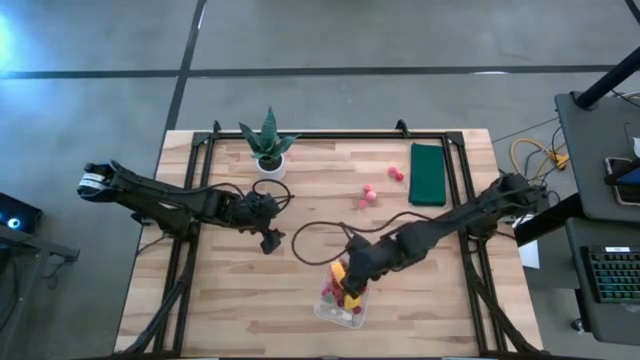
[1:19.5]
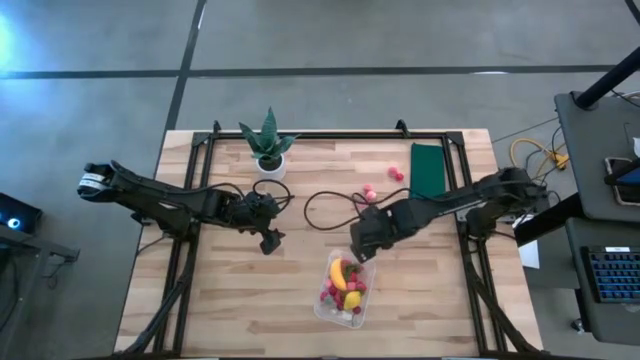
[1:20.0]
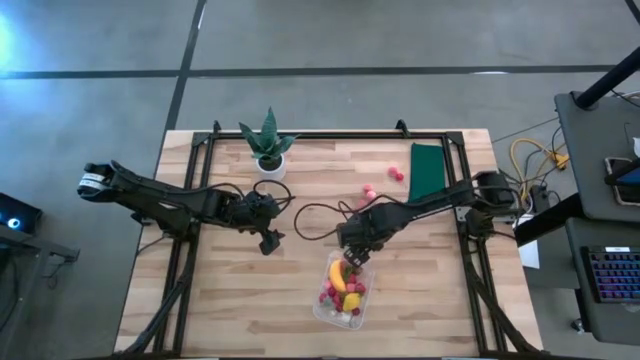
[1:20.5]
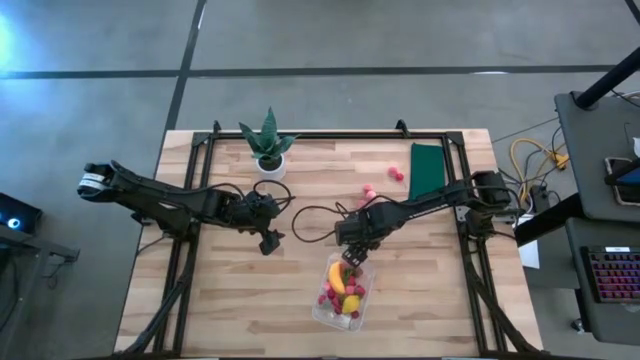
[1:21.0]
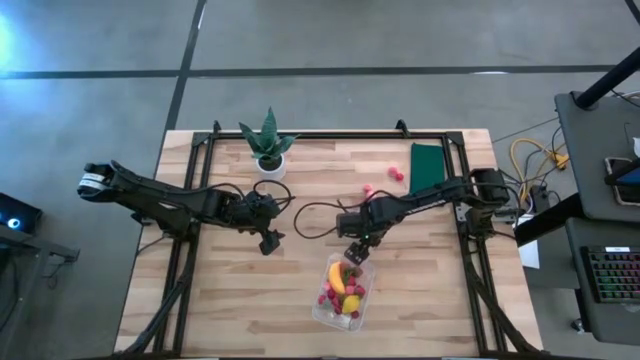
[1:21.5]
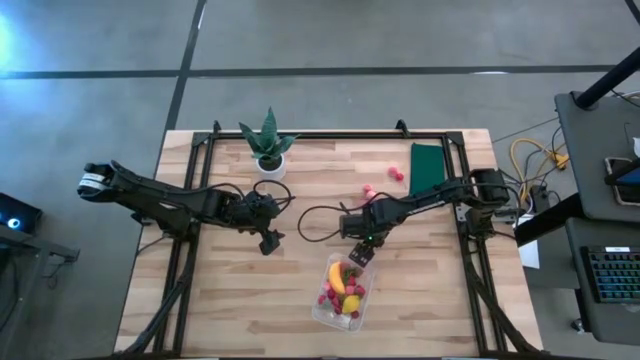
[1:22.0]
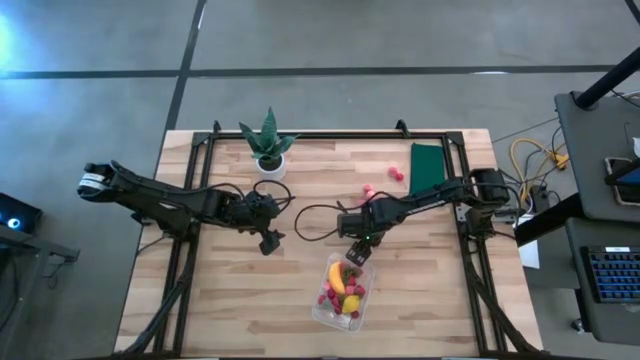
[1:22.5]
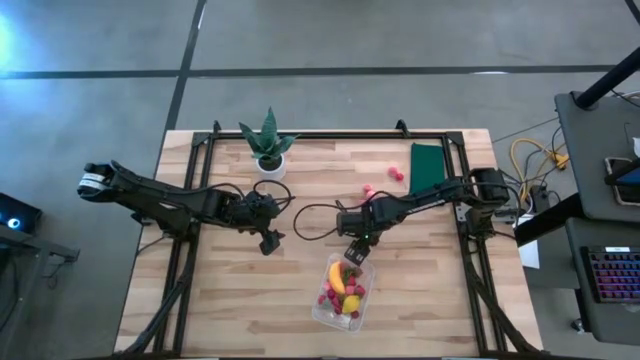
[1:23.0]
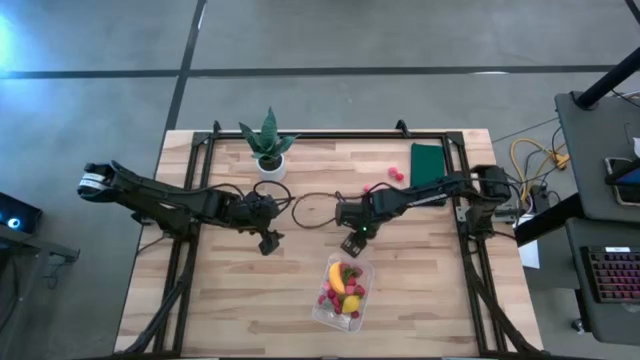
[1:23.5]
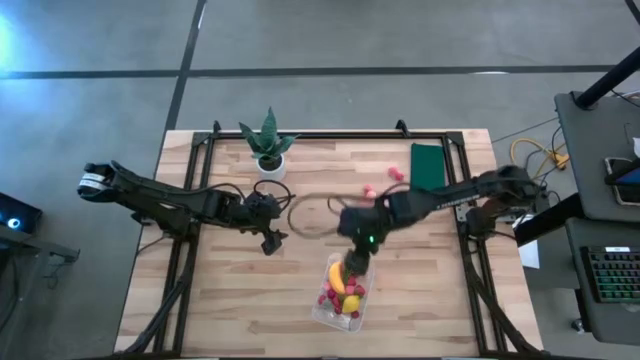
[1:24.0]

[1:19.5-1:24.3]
Task: Pick and placing Produce into tupperware
Put the strawberry into the transparent bin

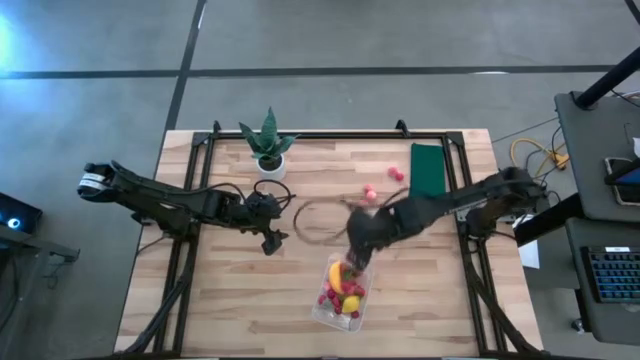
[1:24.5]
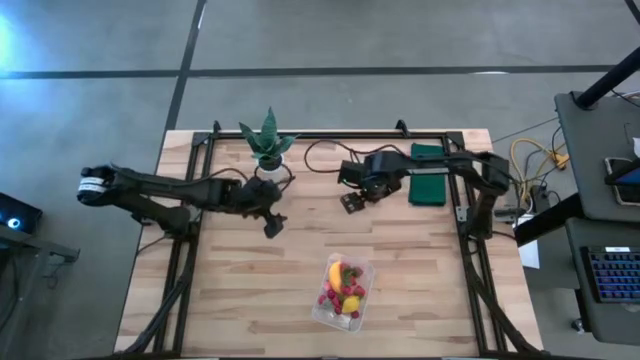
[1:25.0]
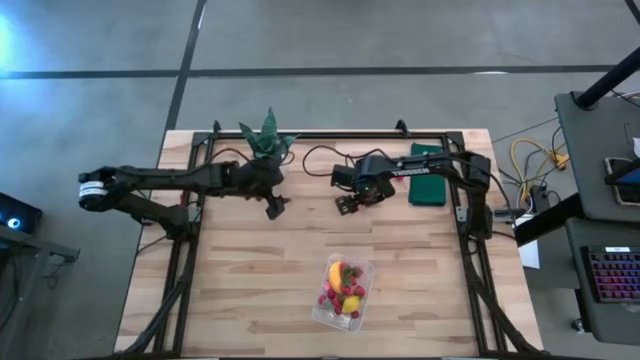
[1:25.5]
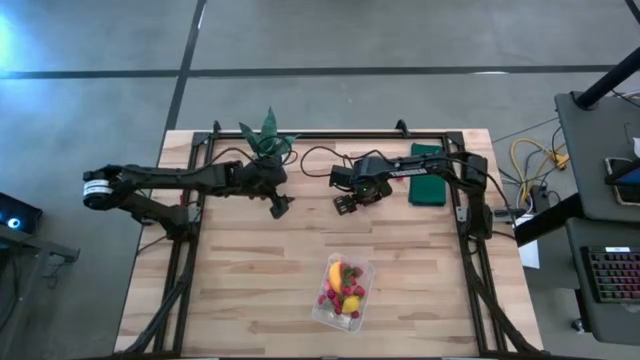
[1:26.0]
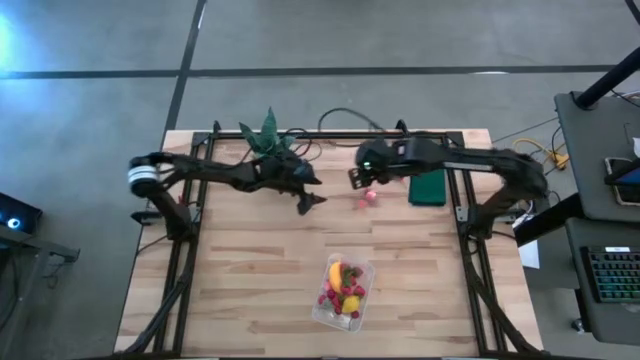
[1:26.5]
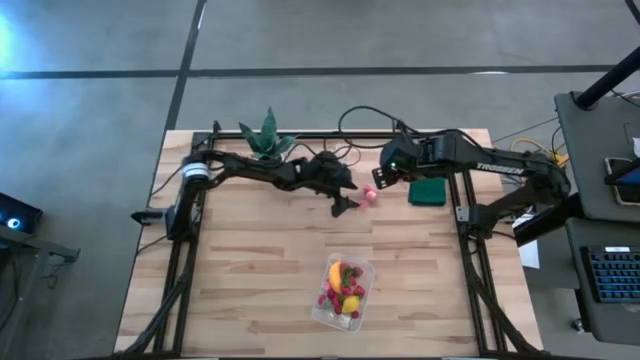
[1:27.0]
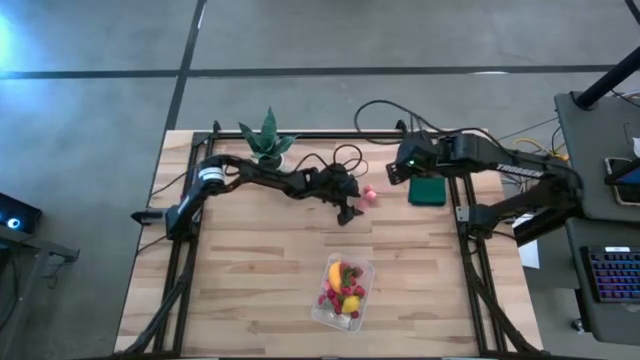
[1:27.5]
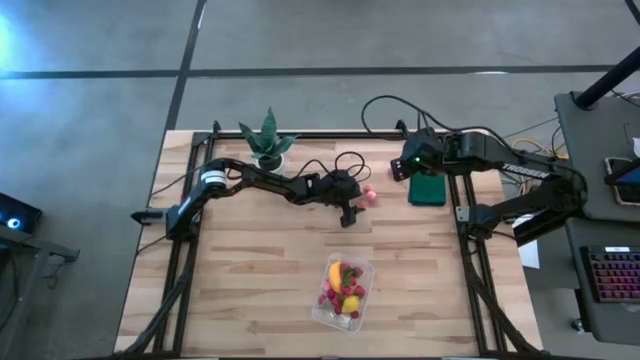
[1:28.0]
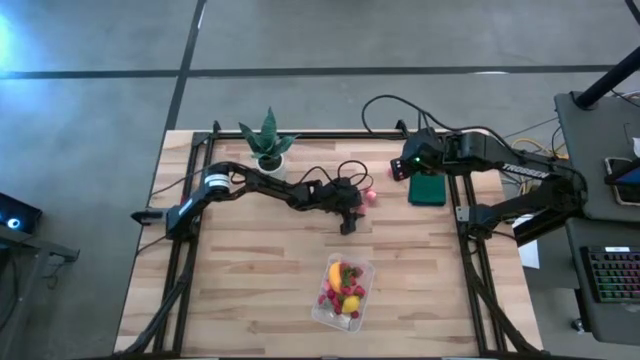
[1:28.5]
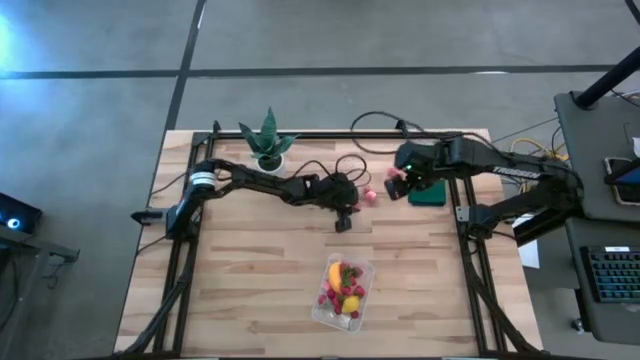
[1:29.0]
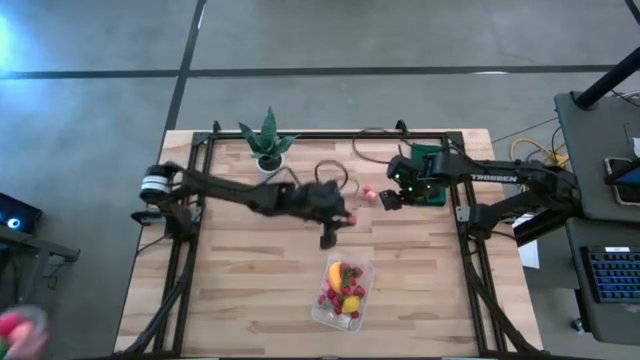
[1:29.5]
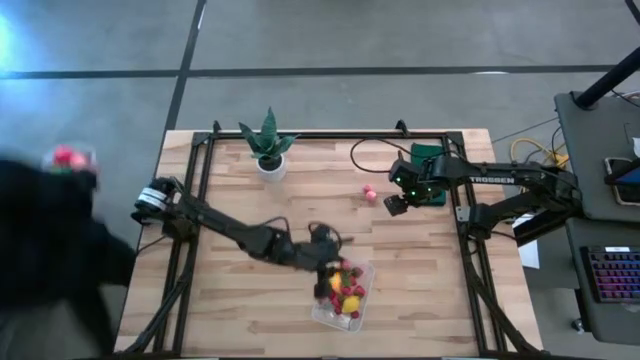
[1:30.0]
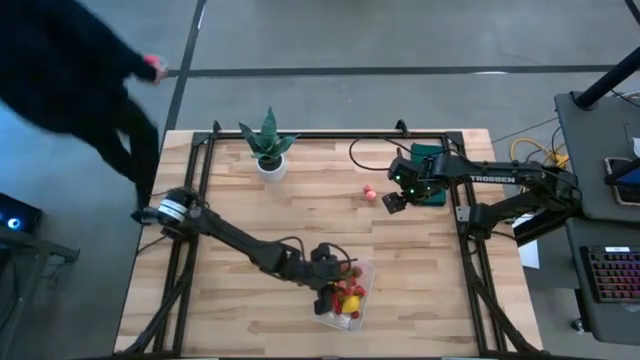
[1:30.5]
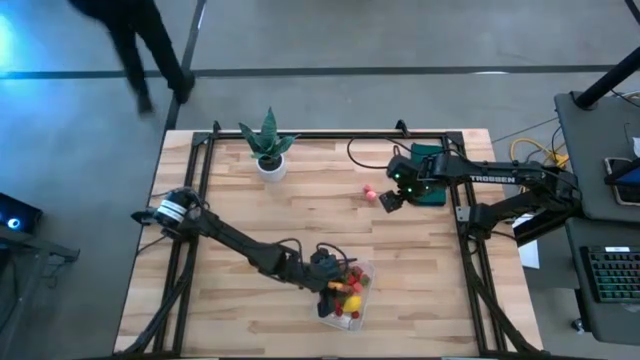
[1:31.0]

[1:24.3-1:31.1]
Put the peach into the transparent bin

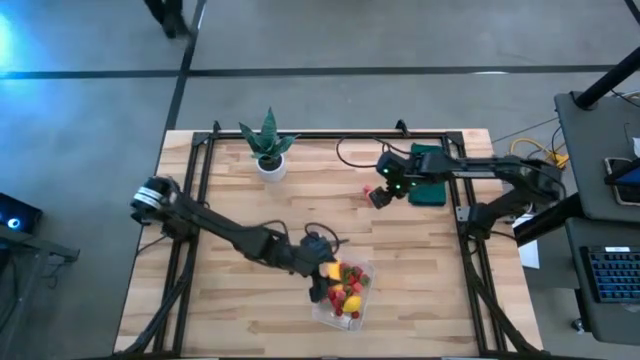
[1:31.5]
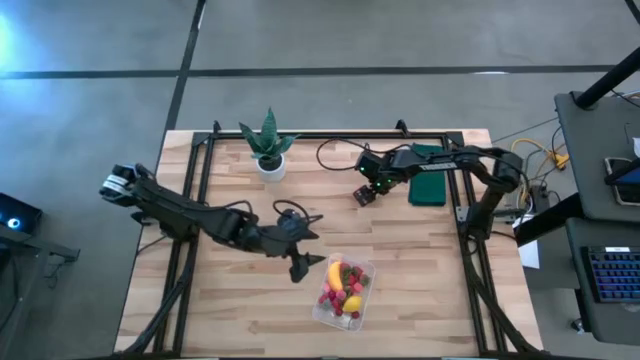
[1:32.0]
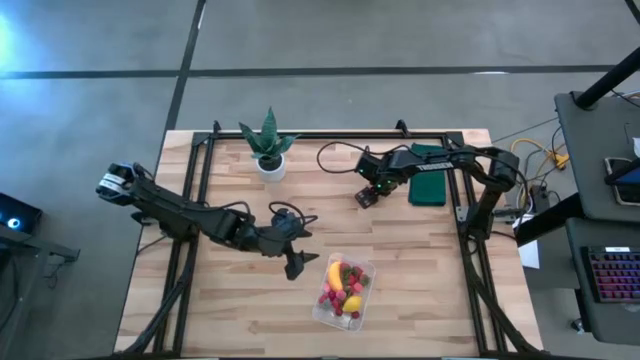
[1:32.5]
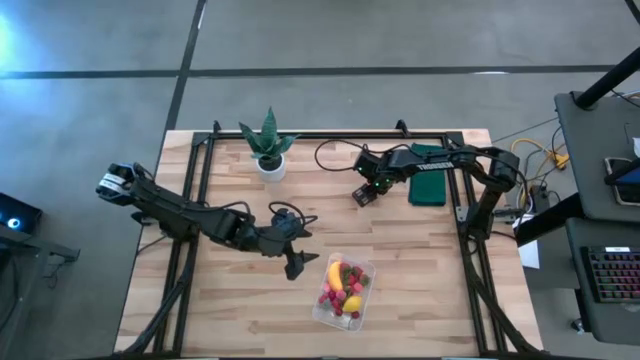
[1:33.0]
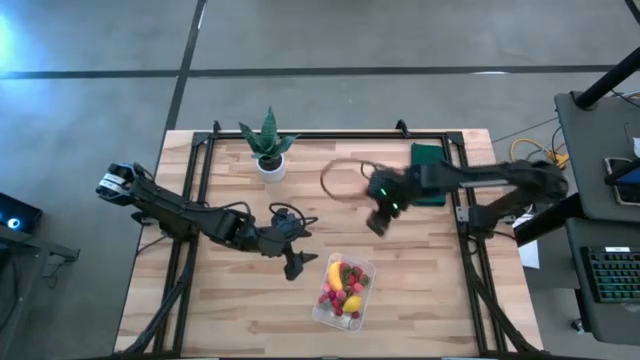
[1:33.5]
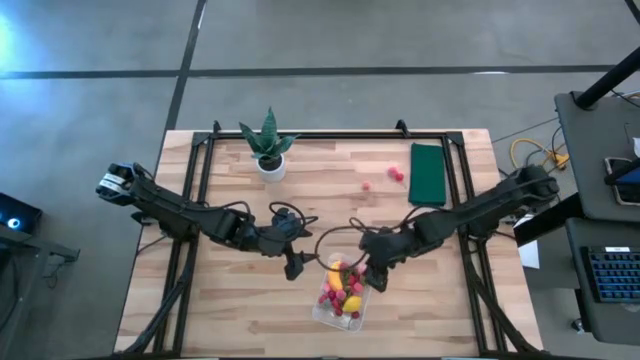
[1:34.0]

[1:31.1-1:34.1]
Put the peach into the transparent bin

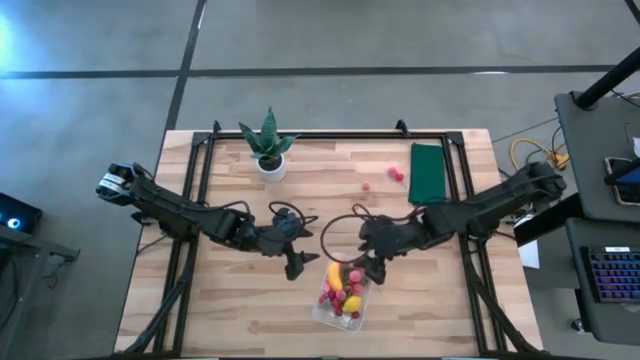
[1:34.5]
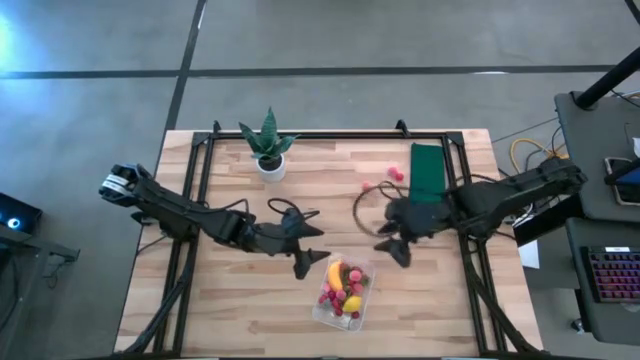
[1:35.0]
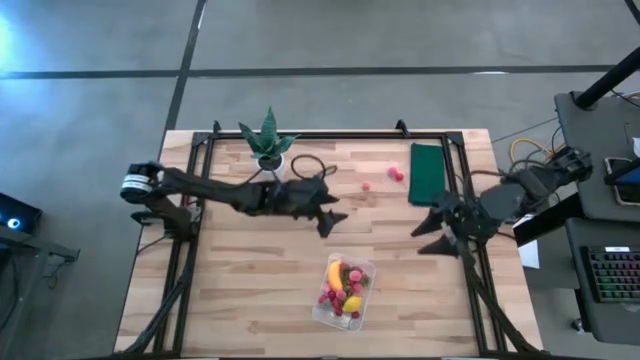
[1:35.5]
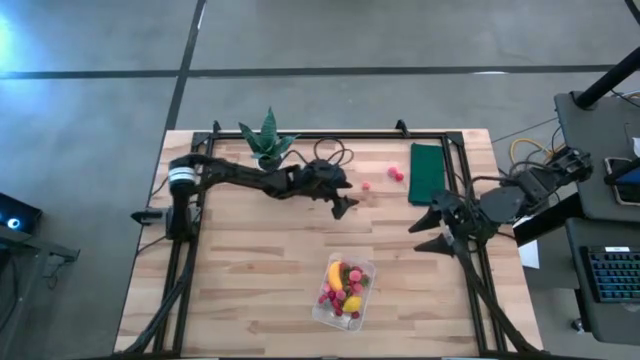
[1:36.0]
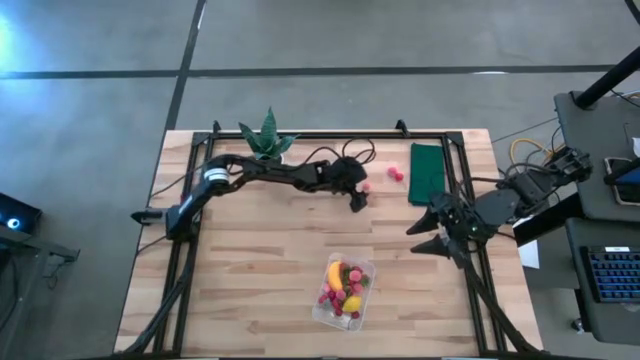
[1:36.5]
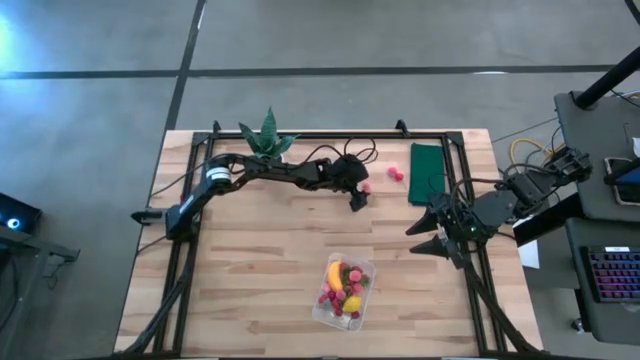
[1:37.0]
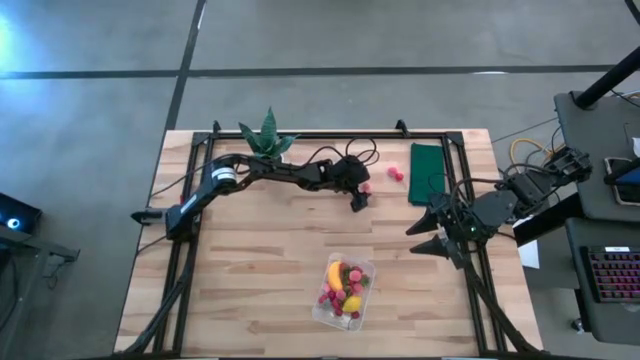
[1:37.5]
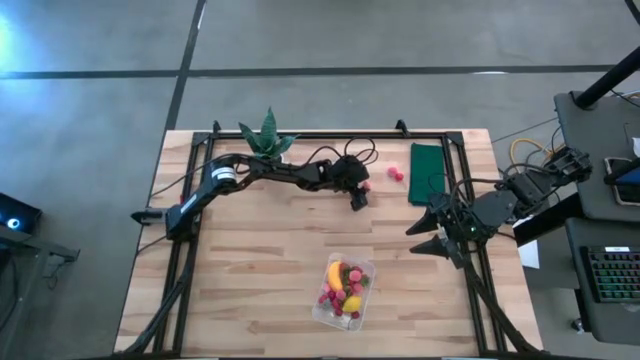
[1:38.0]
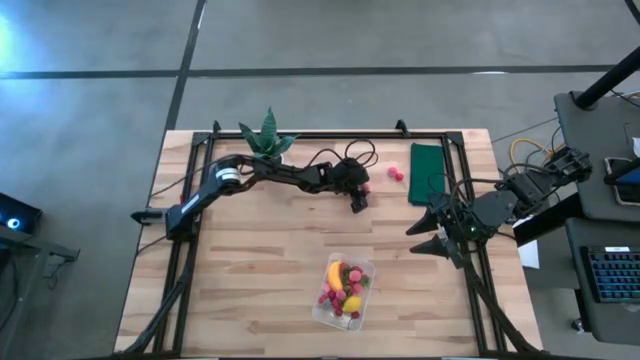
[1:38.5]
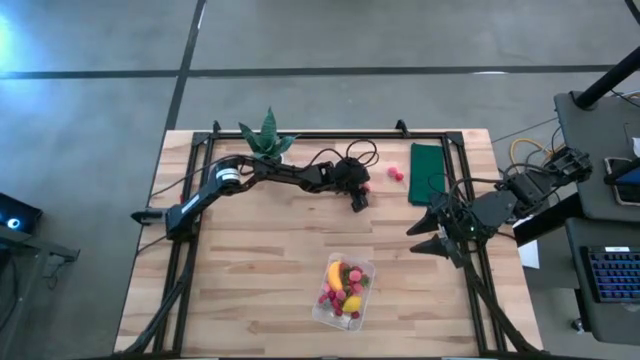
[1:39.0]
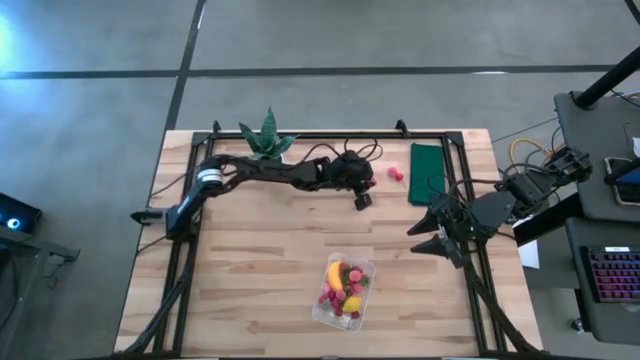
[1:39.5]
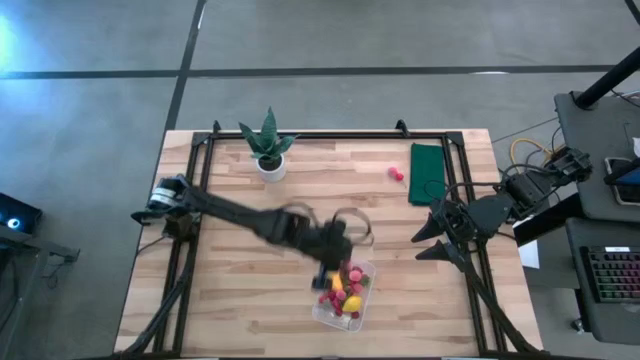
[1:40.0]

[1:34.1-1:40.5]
Put the peach into the transparent bin
